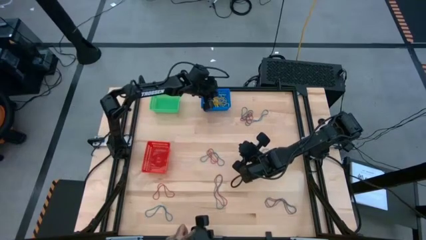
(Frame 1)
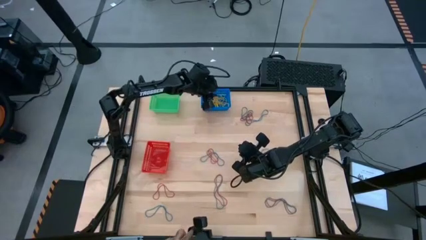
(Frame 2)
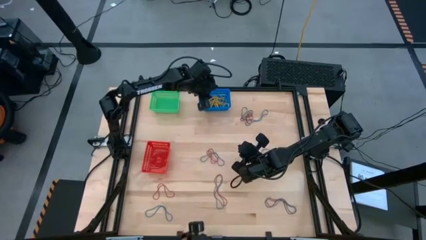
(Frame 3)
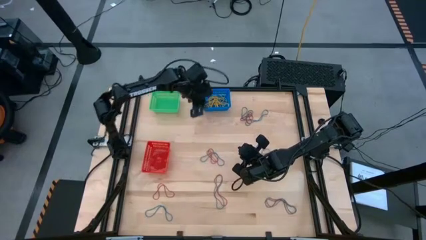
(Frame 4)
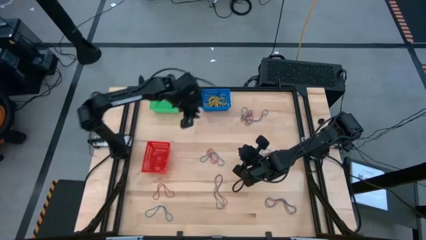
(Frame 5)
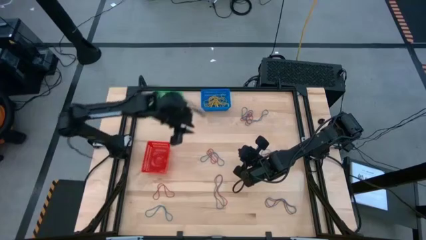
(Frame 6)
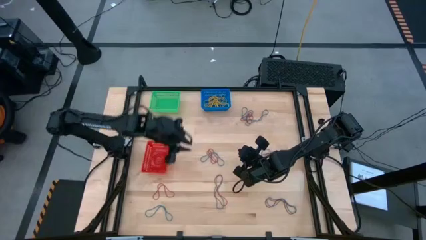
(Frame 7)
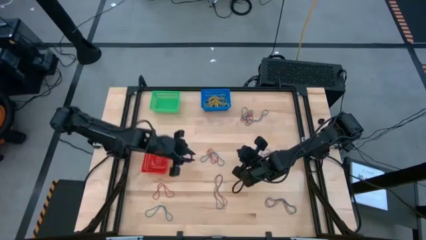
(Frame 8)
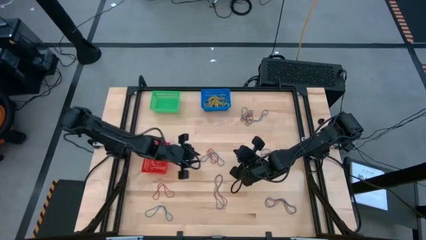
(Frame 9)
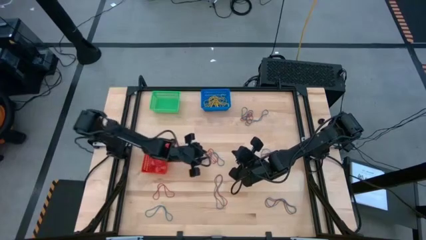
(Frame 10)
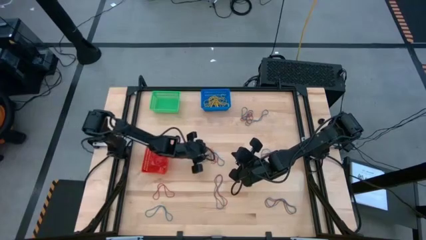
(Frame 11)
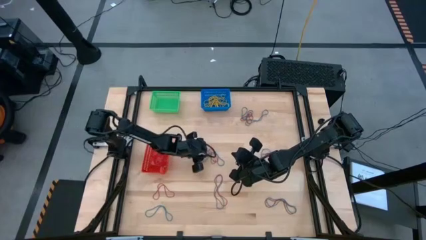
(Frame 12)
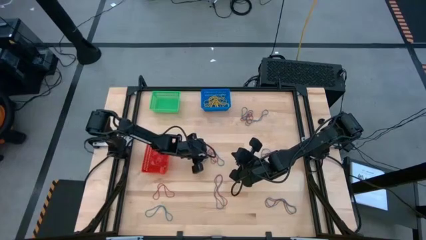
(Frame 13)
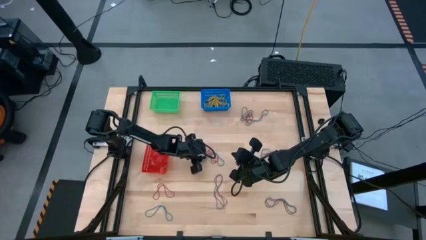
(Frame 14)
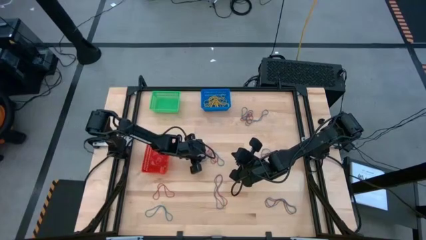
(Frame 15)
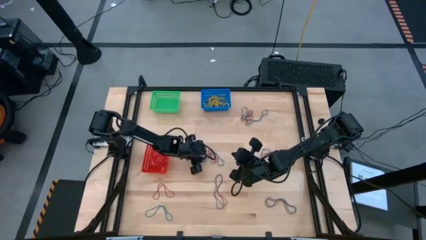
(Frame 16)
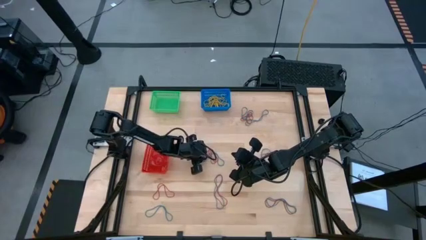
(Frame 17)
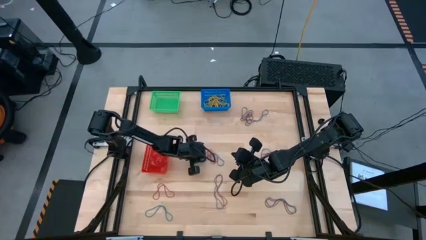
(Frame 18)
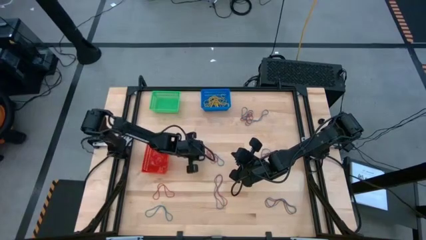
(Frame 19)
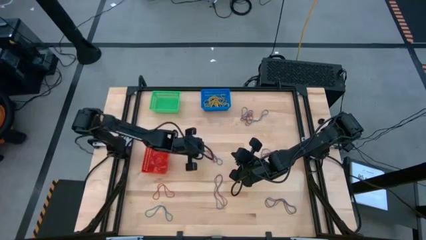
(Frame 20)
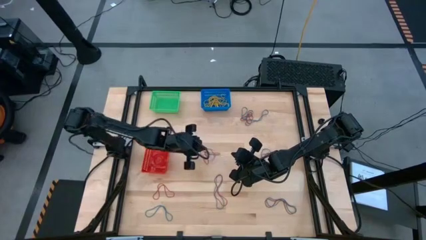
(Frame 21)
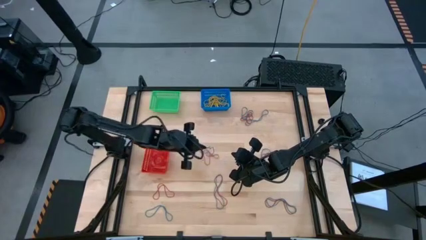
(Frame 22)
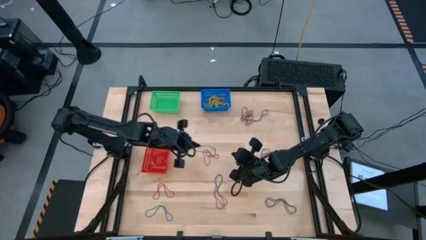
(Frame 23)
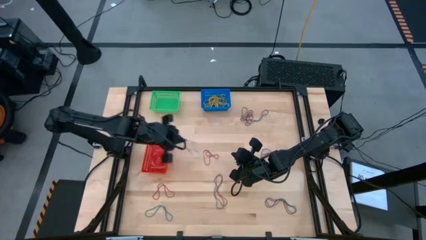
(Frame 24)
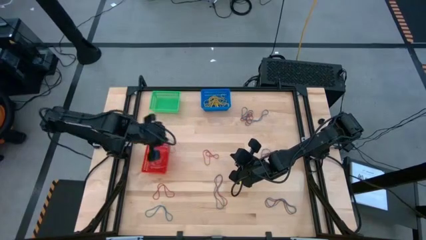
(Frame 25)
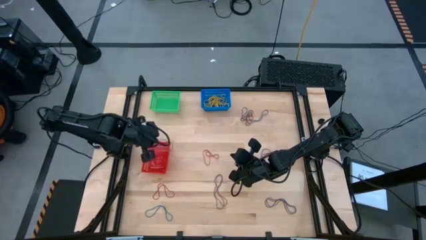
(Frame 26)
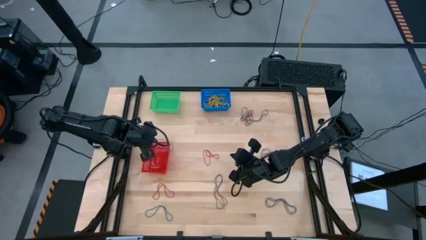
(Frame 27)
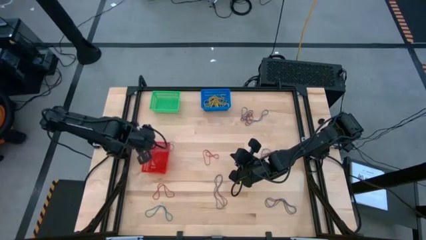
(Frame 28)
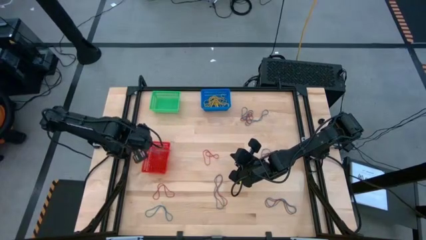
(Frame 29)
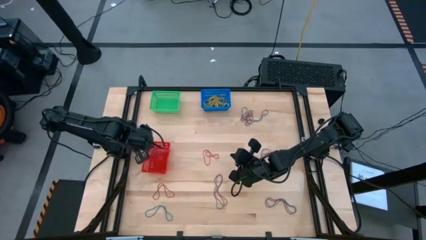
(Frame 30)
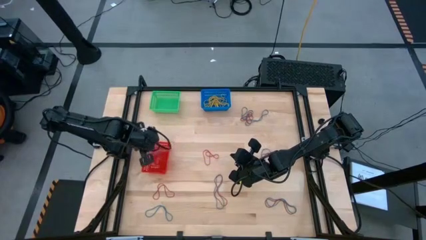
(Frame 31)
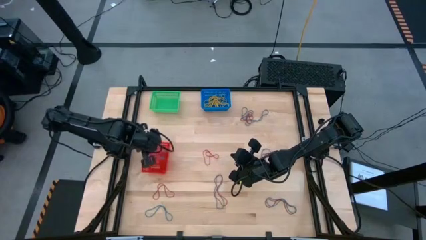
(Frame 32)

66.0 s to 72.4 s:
Task: Sort rubber bands into baskets
Put the blue rubber band into the red bin

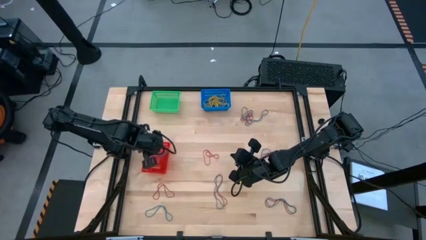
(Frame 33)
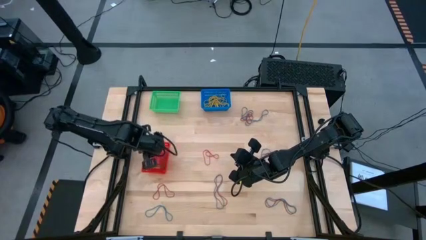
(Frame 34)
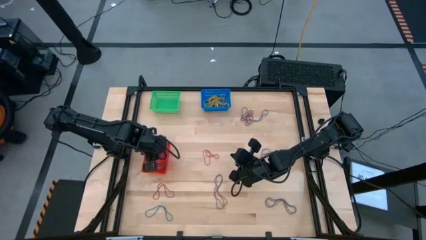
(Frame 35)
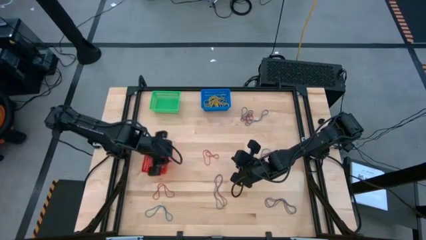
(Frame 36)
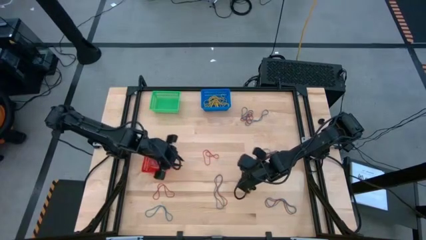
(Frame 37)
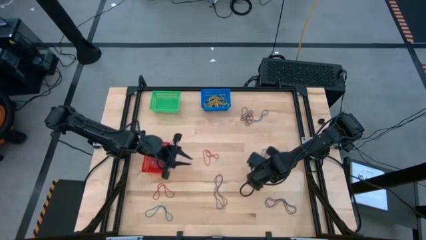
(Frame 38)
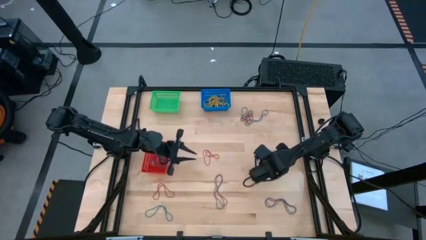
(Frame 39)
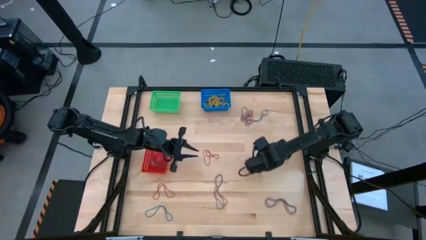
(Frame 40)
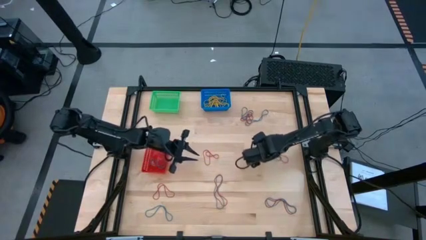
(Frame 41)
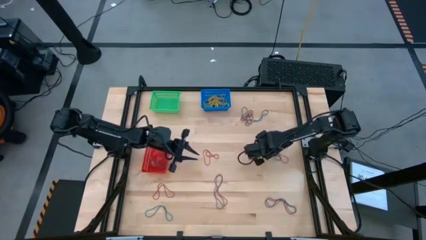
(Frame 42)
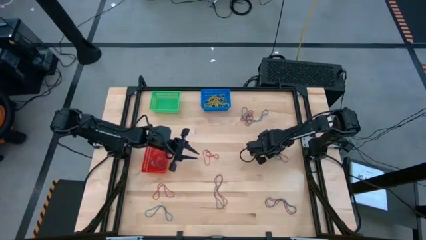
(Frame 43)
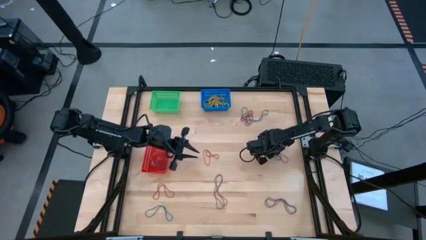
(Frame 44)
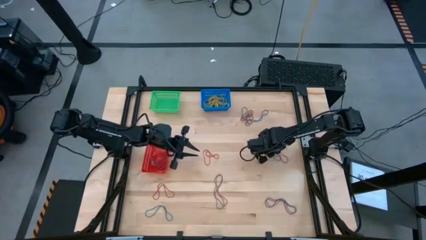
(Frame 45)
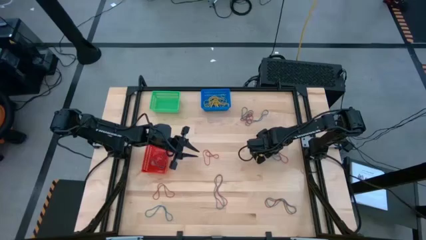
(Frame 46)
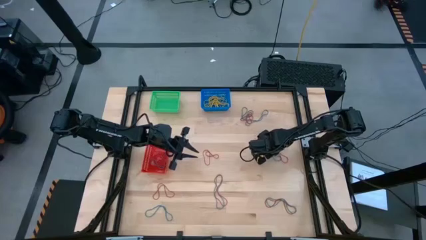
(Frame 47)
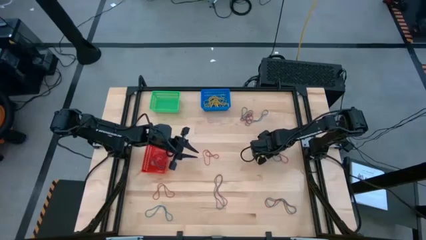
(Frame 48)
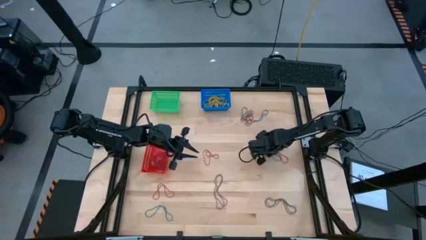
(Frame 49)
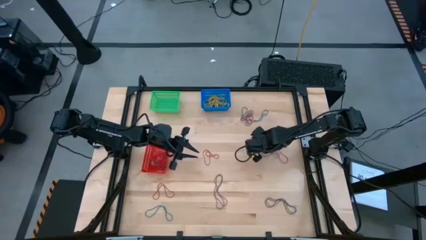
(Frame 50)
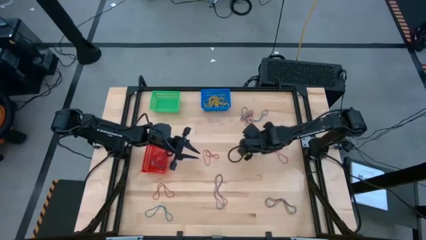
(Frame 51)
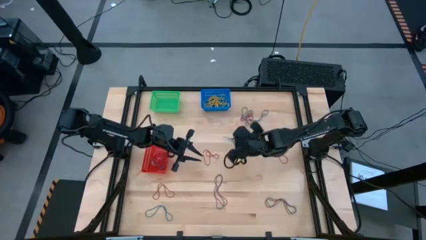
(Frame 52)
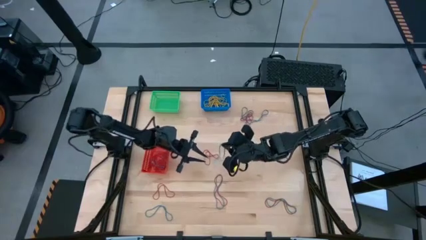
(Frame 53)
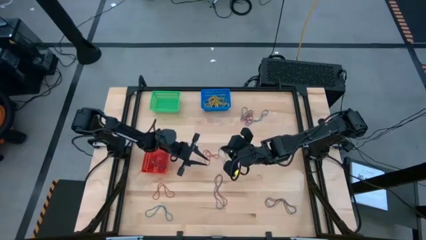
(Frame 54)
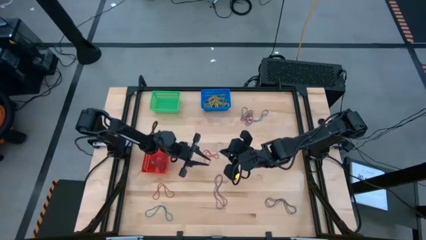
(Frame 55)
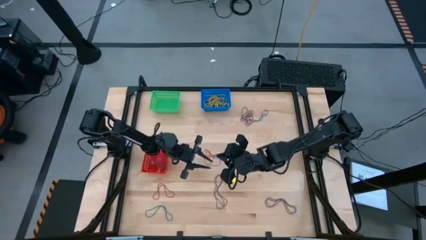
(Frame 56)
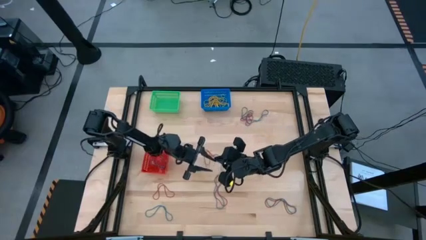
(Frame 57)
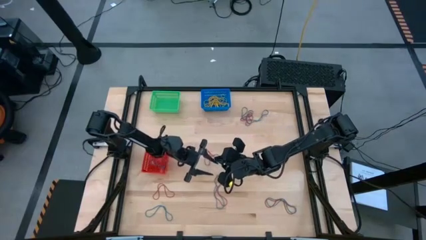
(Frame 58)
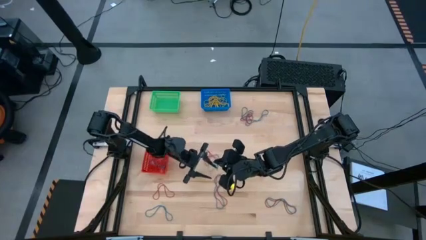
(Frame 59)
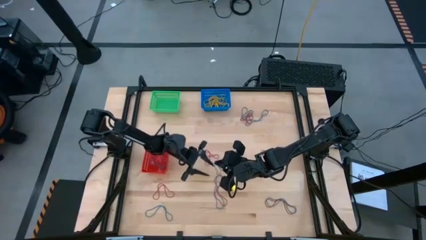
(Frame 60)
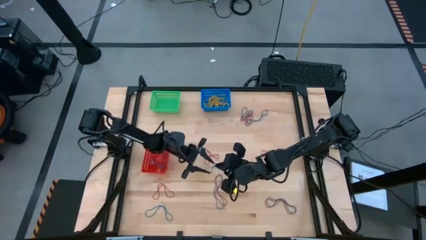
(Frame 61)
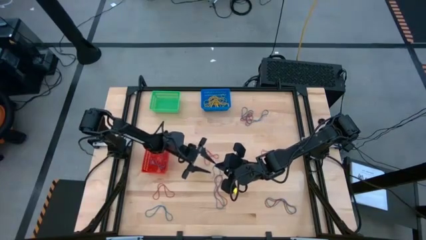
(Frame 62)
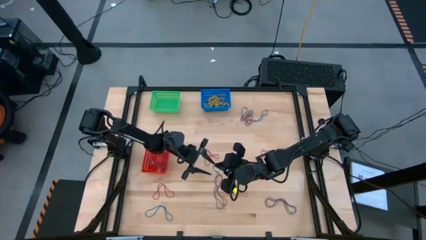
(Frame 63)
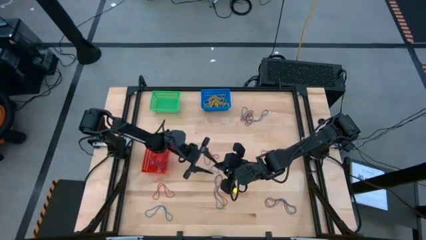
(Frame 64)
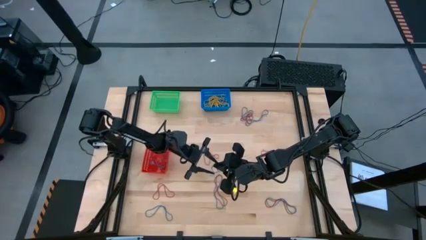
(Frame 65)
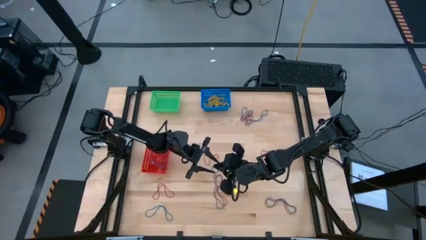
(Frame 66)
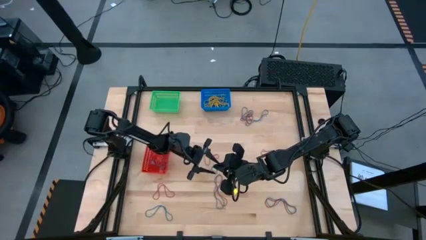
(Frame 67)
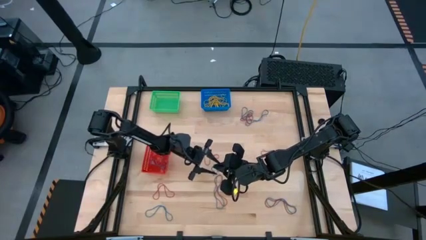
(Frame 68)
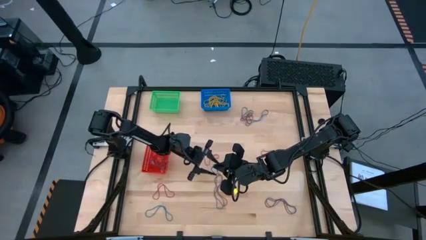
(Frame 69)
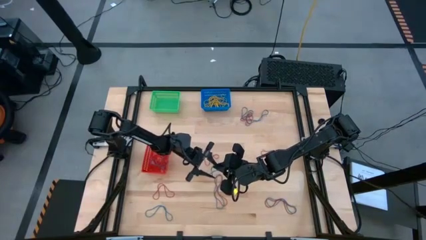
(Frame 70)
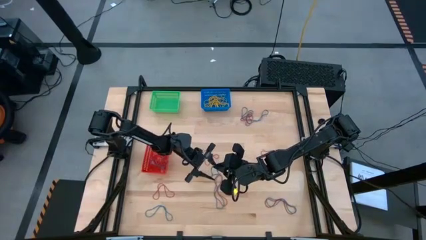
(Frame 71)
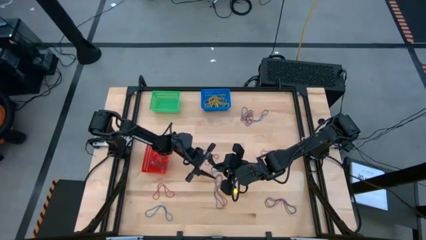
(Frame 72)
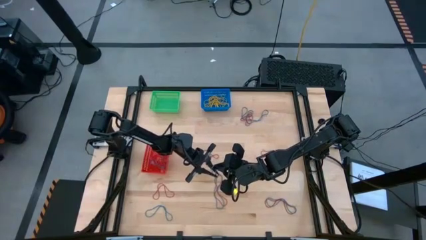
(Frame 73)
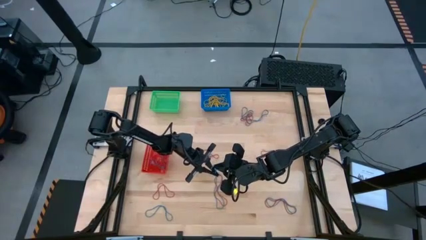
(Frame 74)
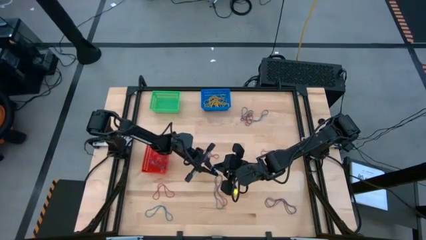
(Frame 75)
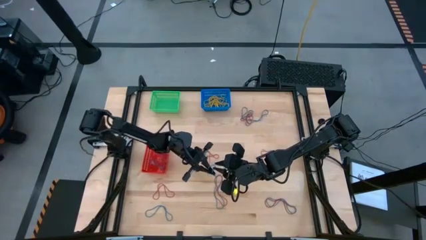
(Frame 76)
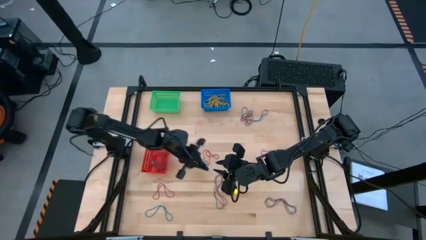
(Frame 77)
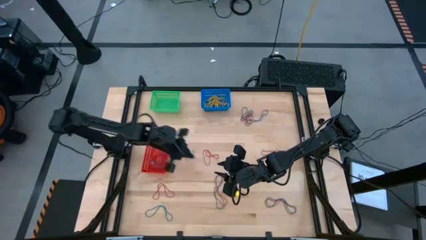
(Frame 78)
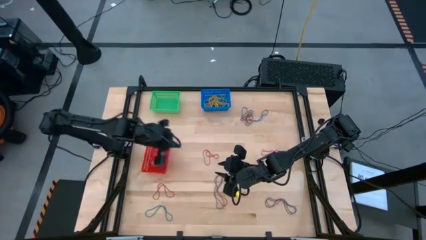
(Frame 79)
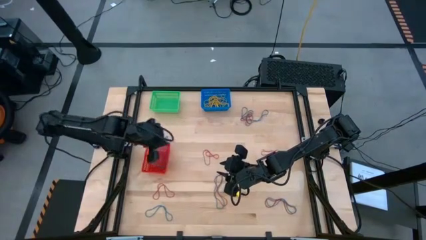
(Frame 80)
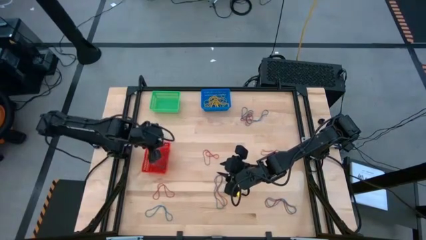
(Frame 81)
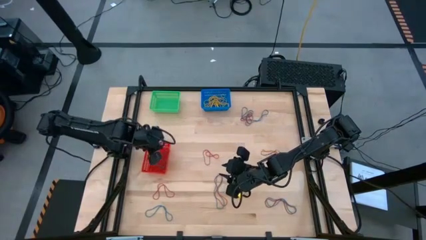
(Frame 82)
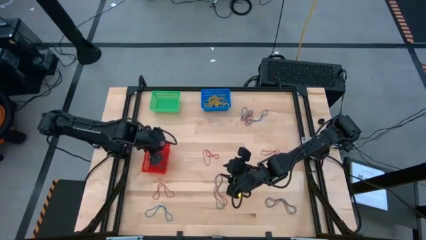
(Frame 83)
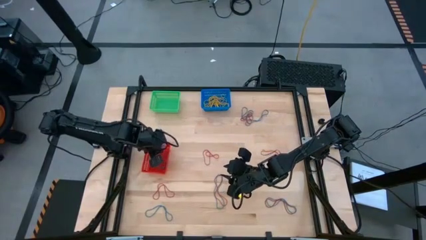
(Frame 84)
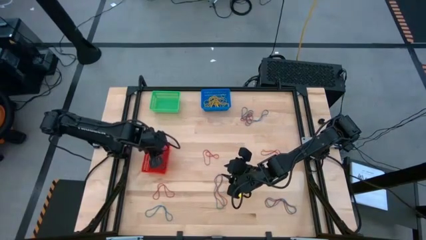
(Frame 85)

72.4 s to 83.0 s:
Put the blue rubber band into the red bin
